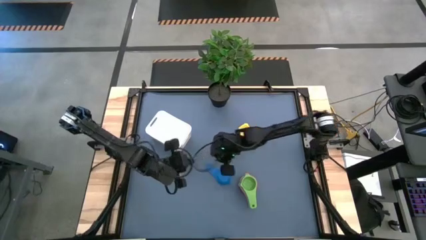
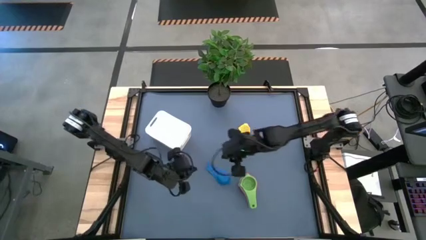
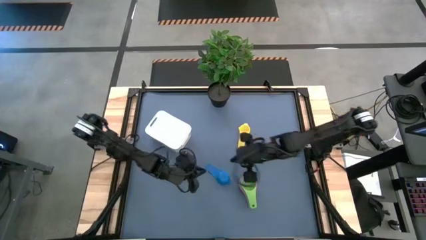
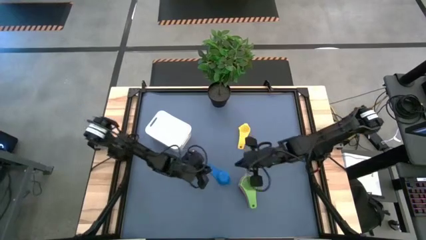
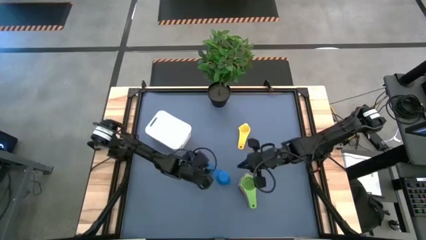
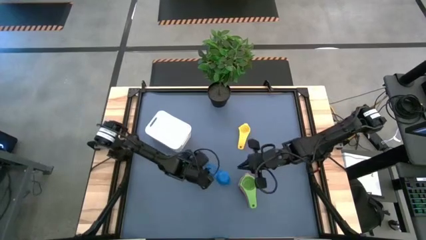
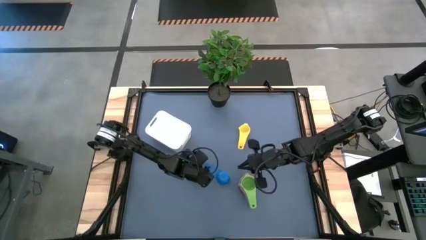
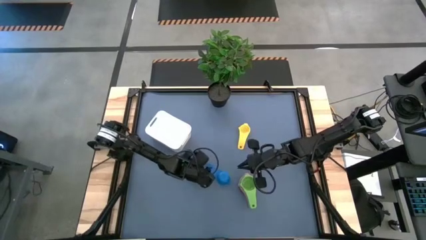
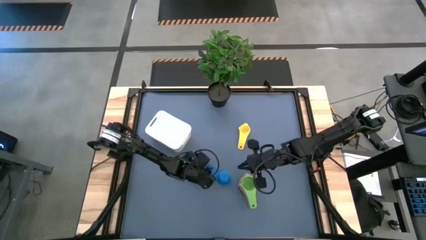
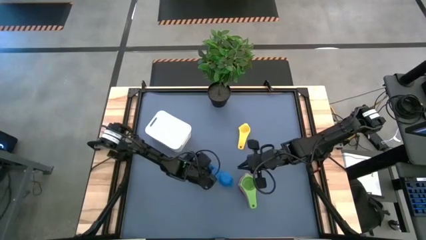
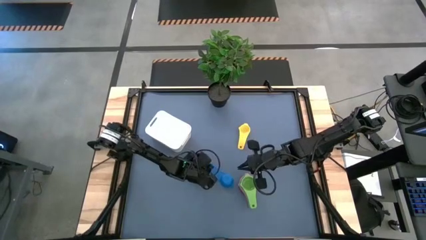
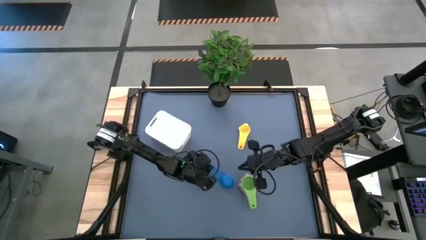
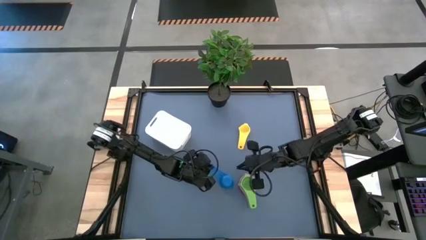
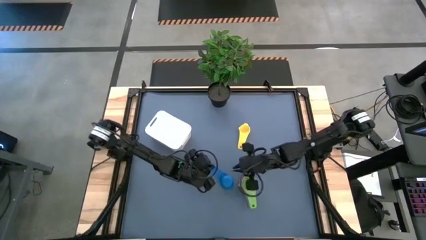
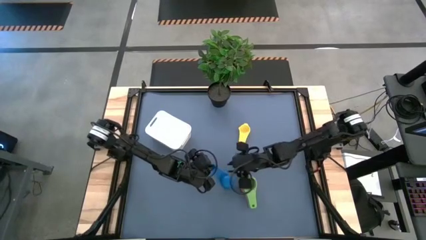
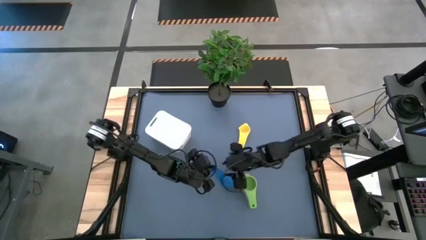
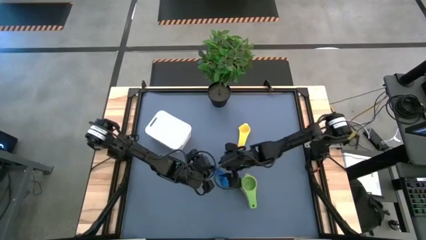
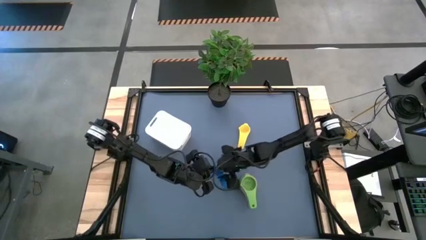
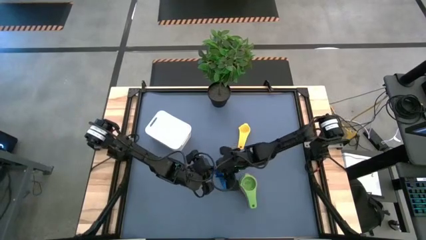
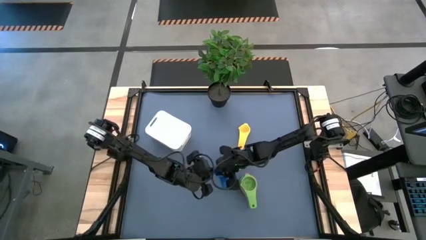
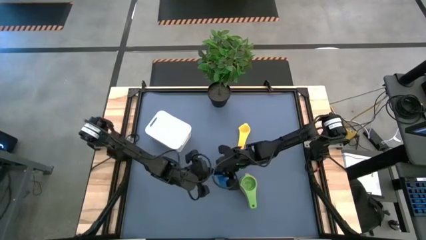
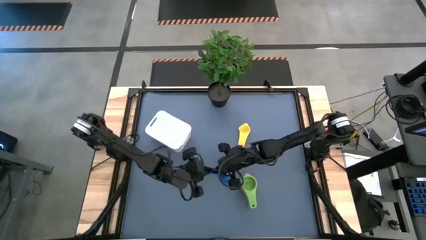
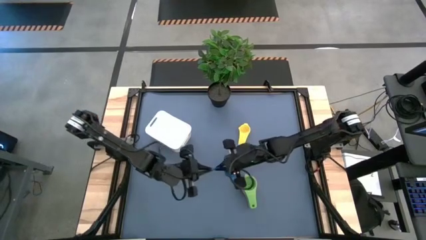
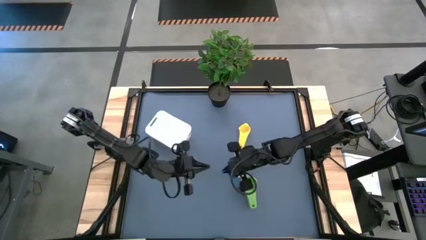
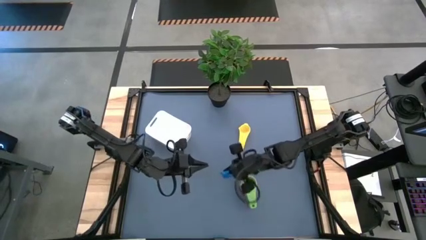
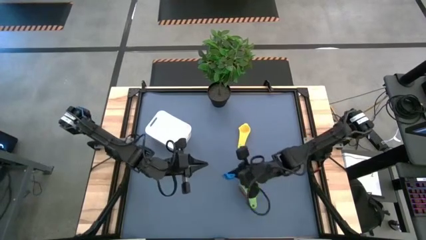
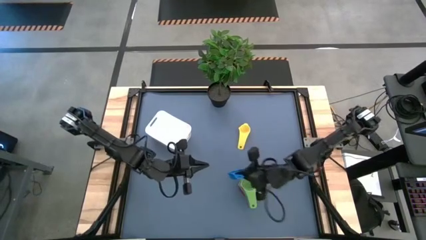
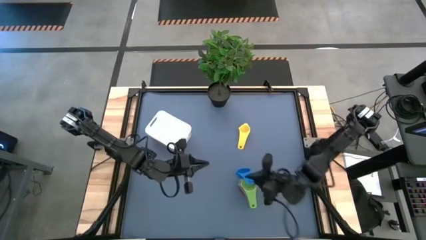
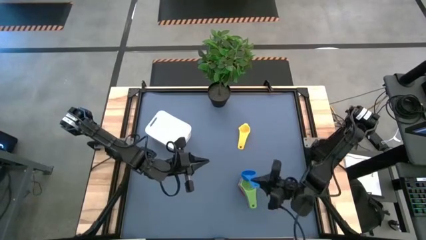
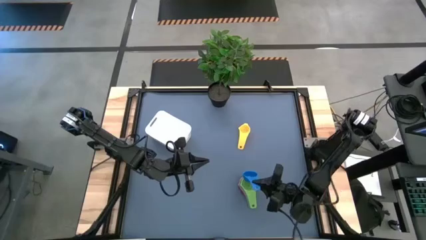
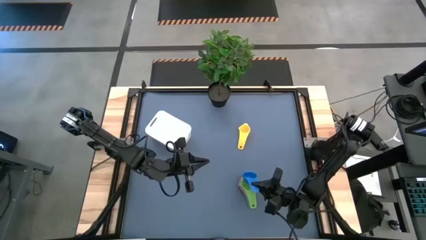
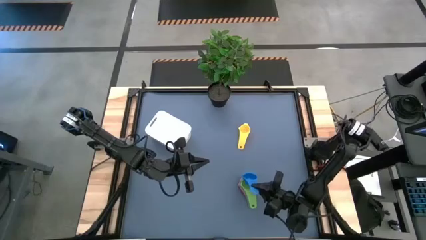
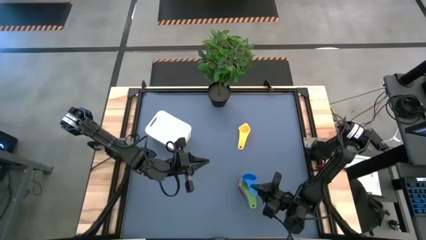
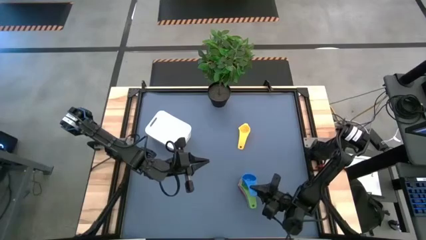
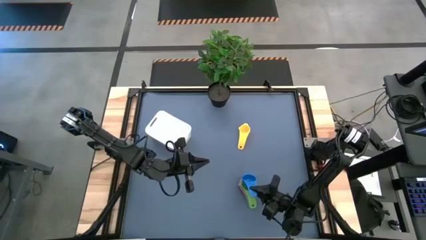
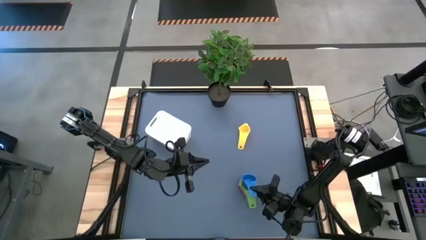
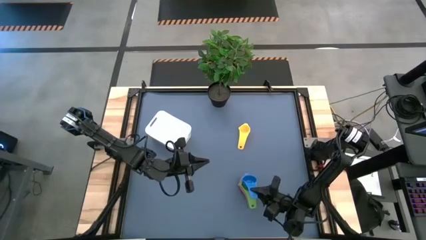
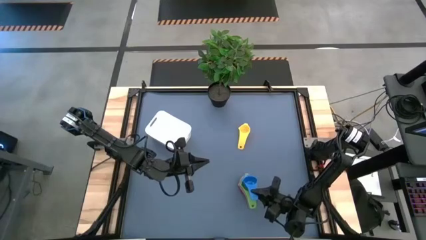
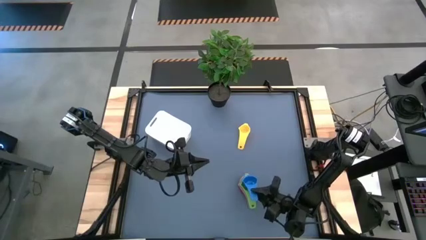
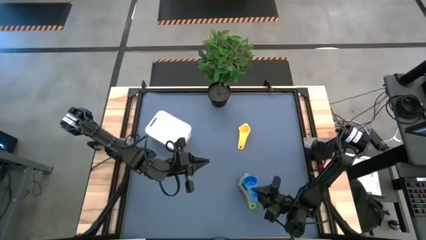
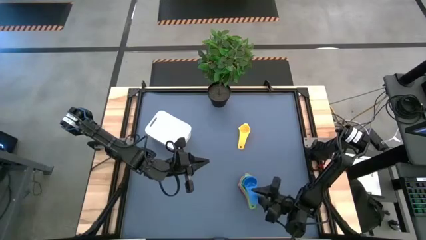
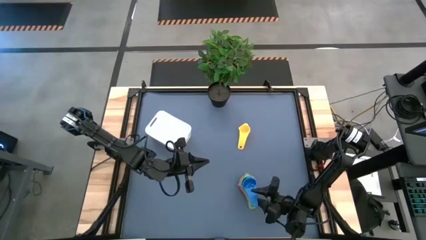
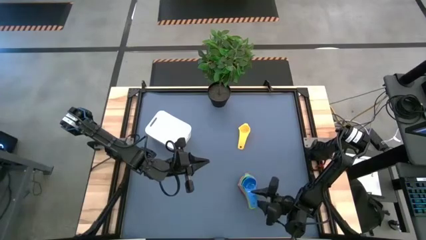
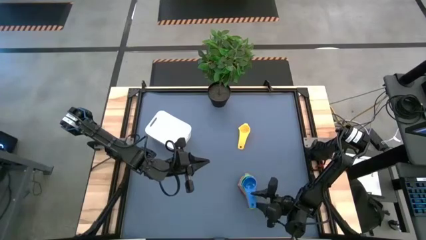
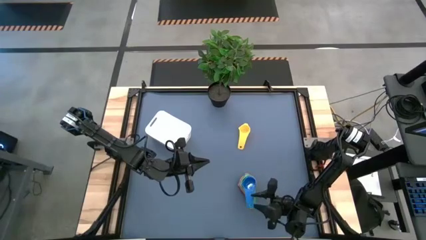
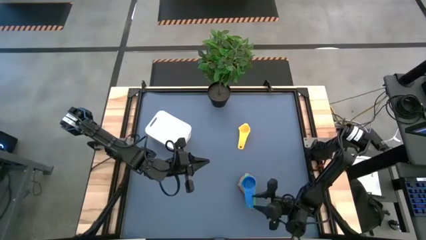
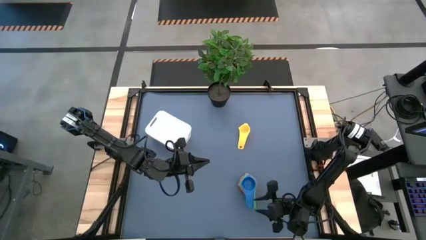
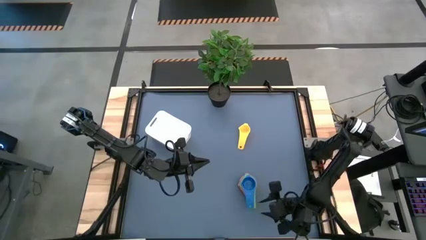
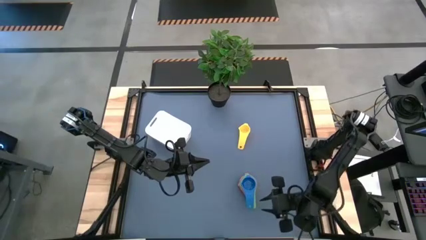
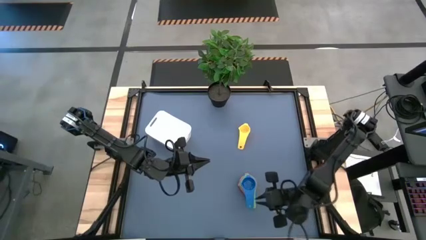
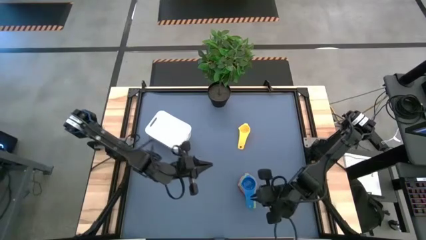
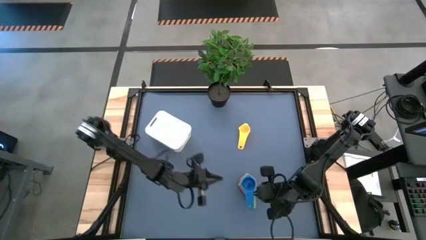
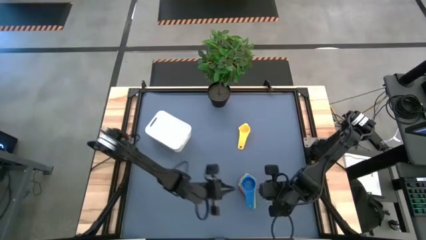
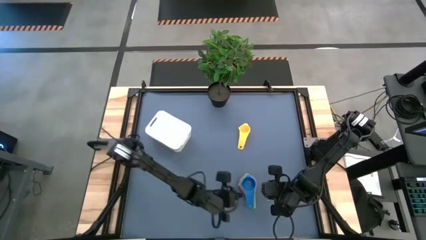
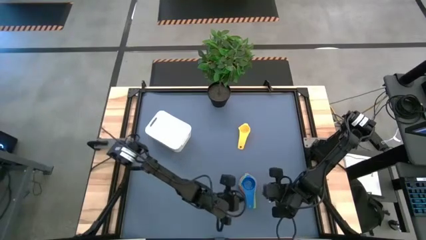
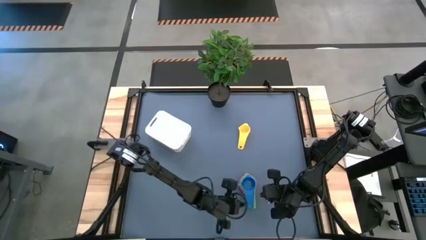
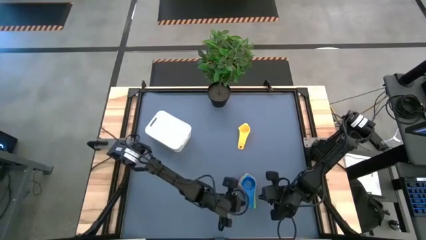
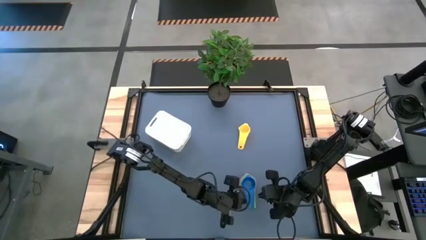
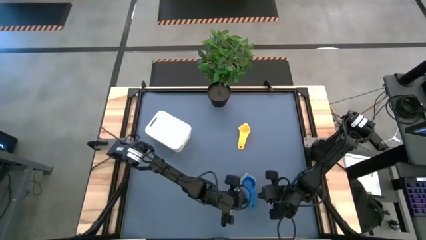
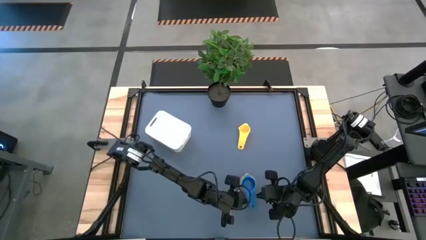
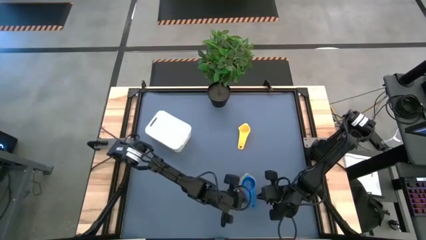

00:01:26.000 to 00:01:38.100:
Task: Nest measuring cups in basket
Stack the blue measuring cup on the light green measuring cup

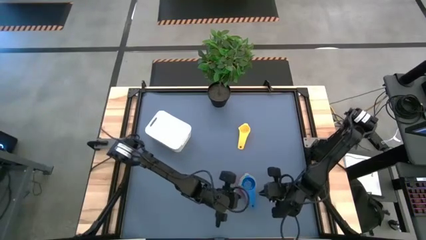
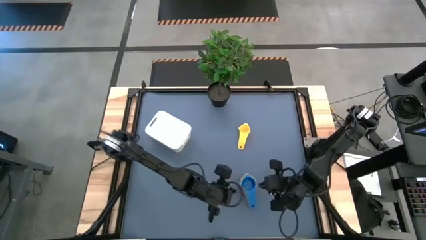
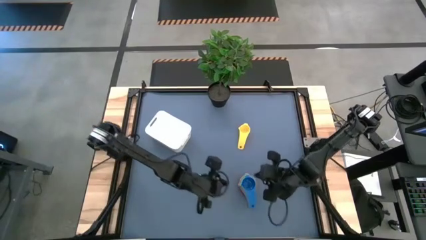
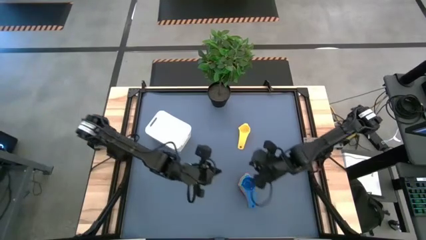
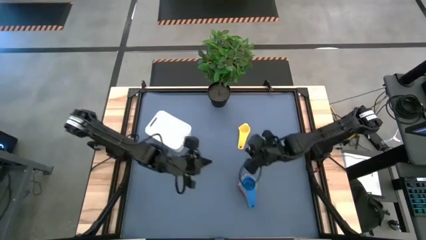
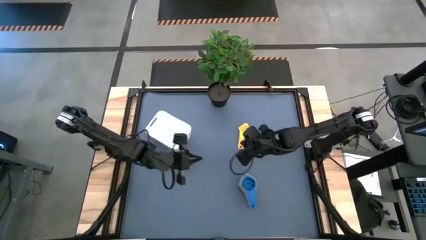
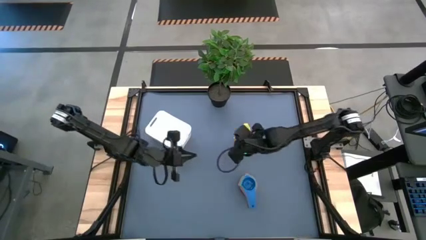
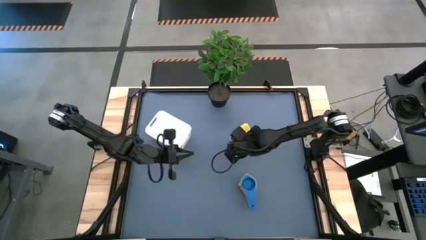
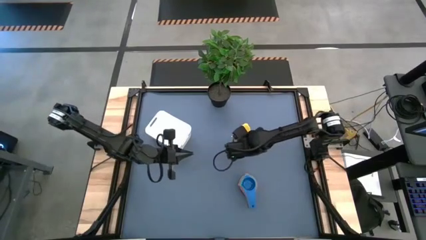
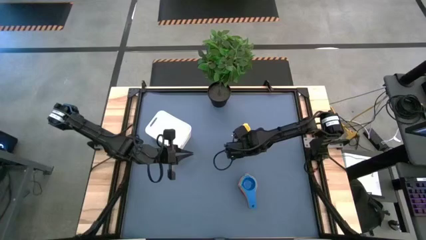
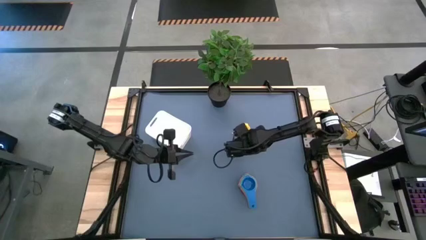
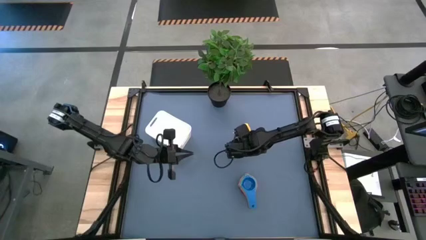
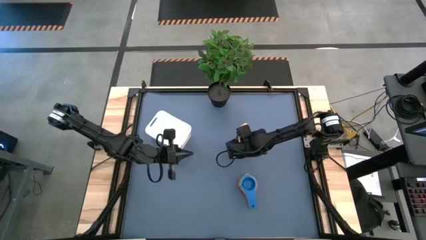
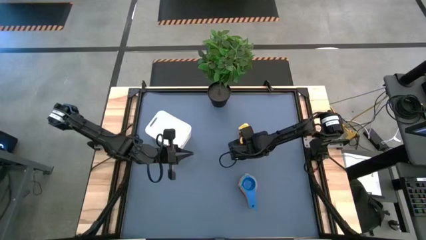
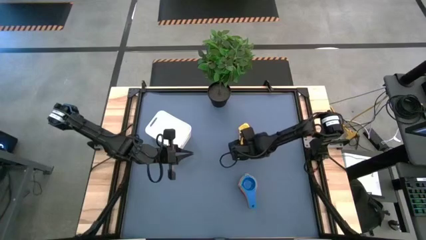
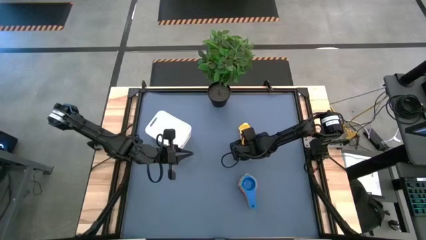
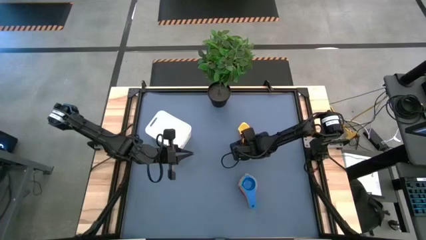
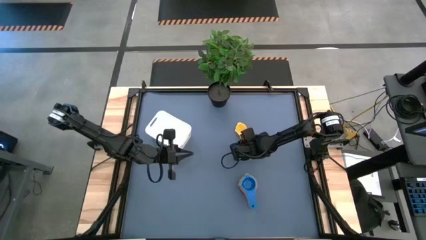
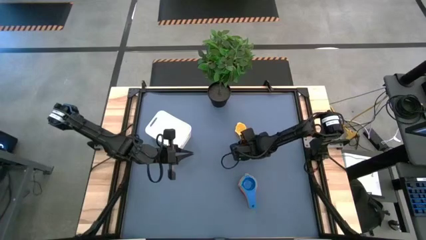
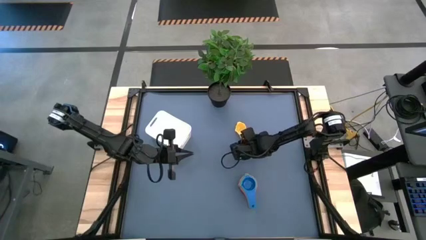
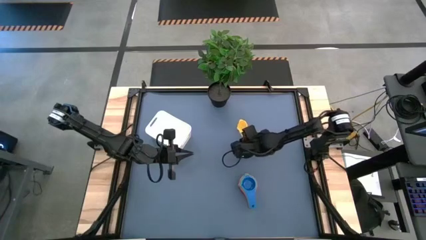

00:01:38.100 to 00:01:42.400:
Stack the yellow measuring cup on the blue measuring cup
